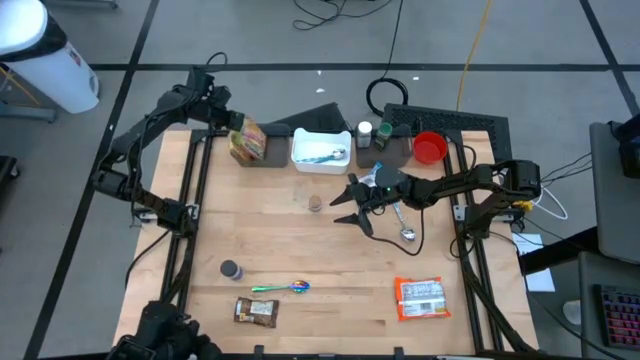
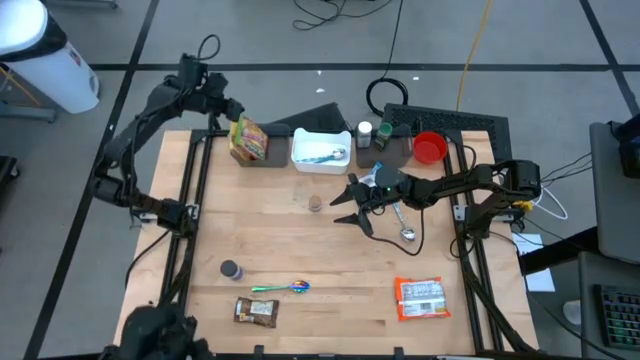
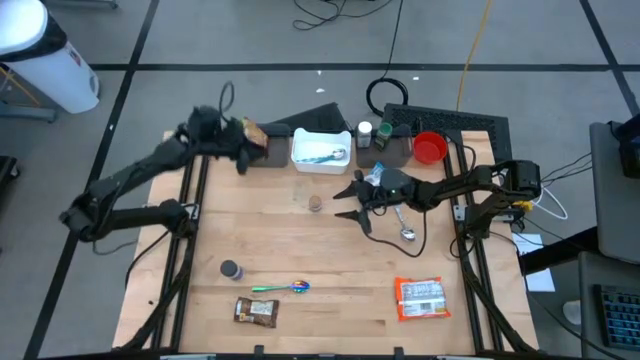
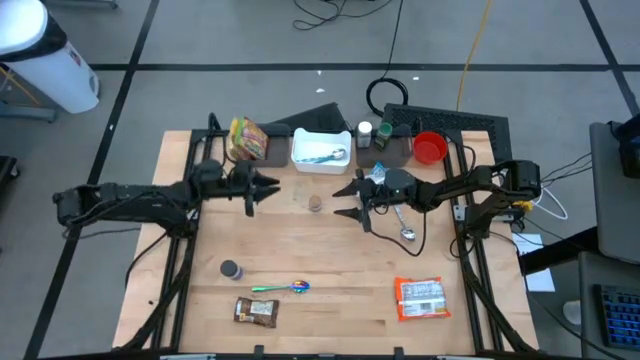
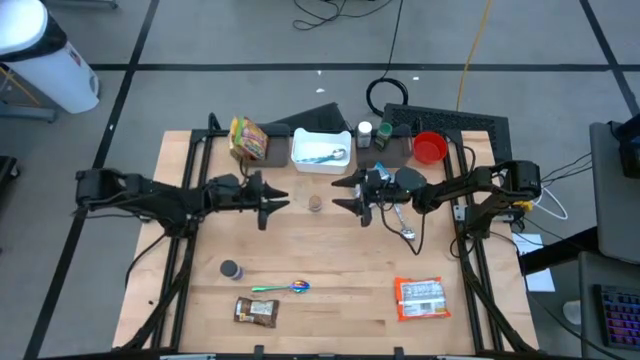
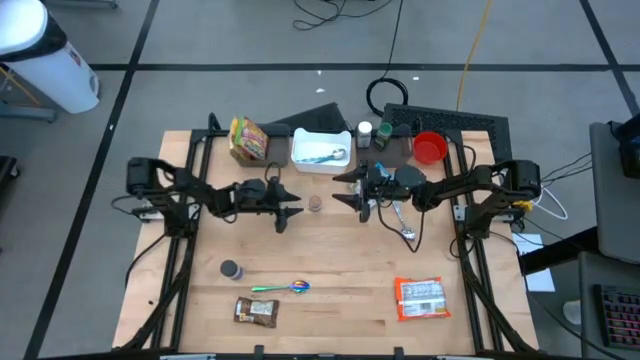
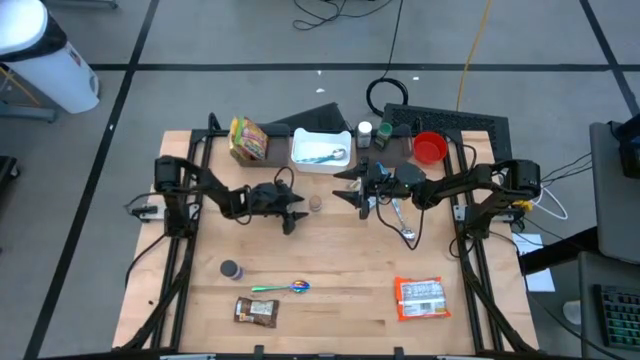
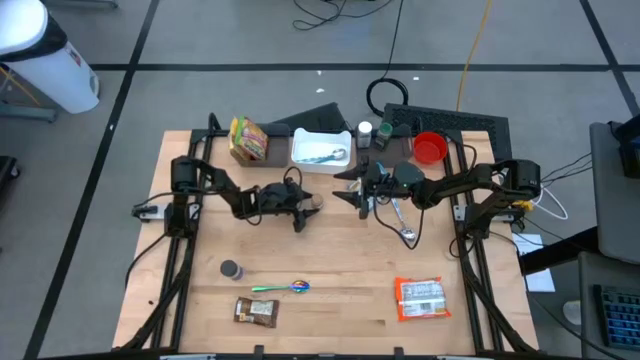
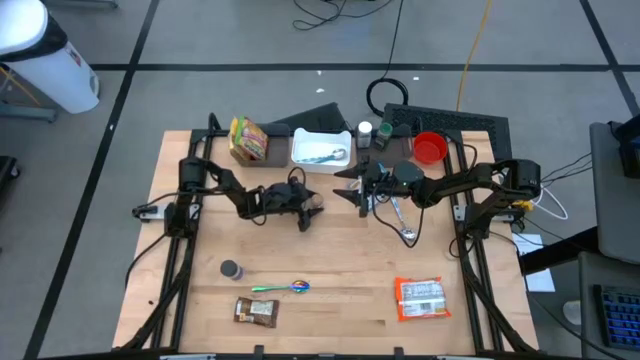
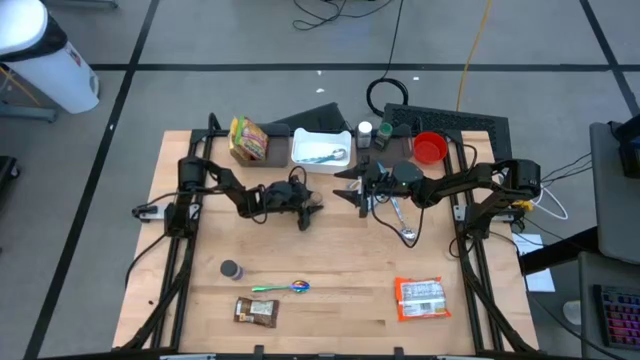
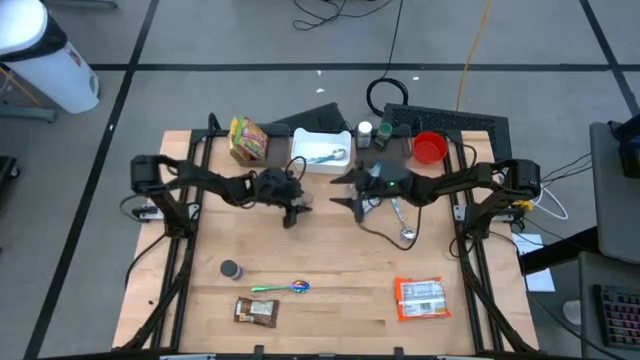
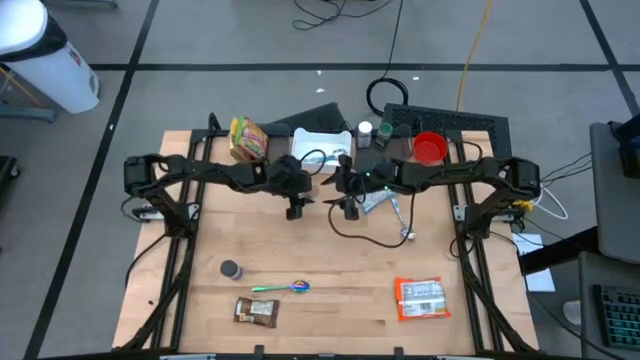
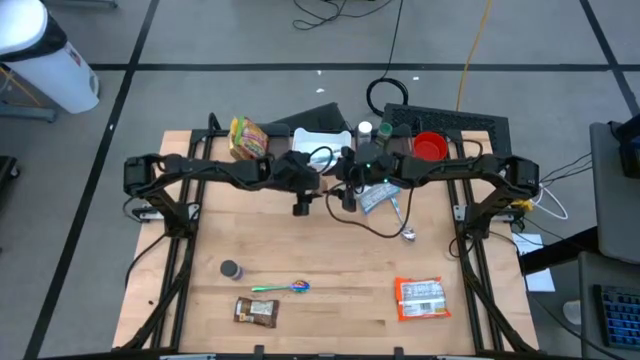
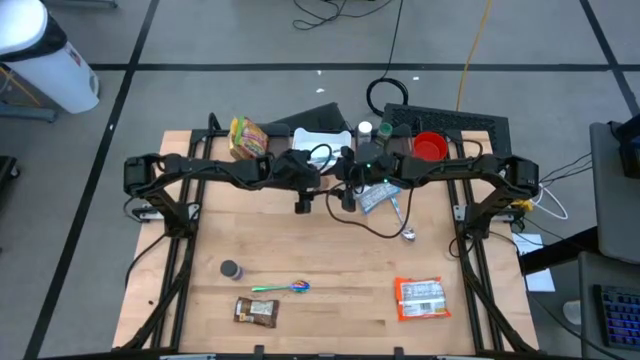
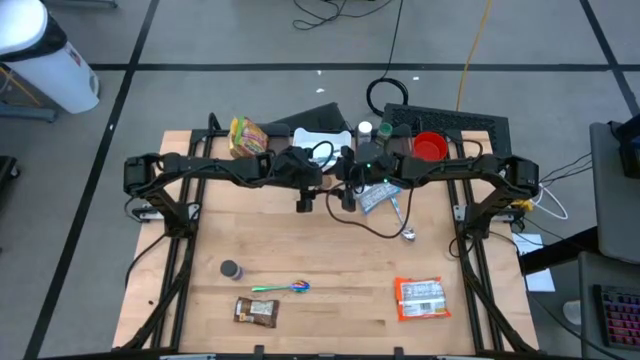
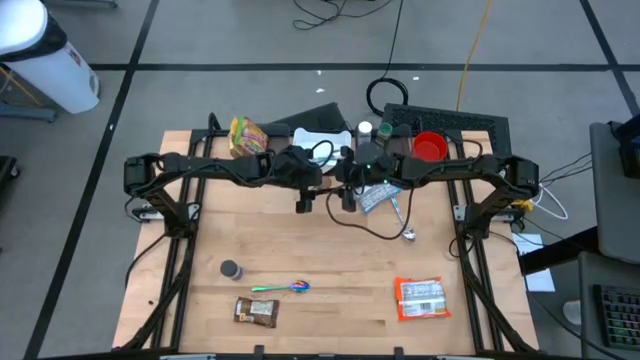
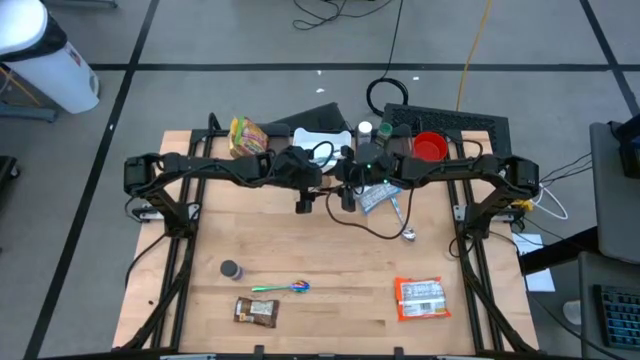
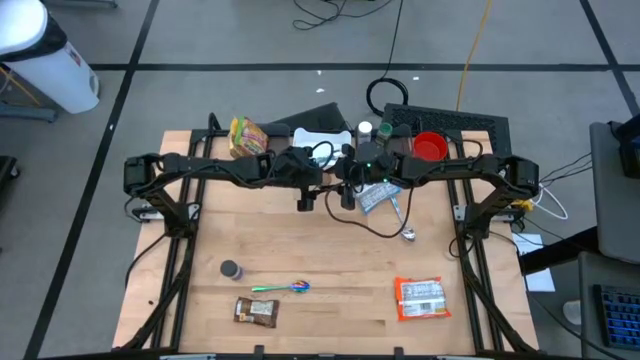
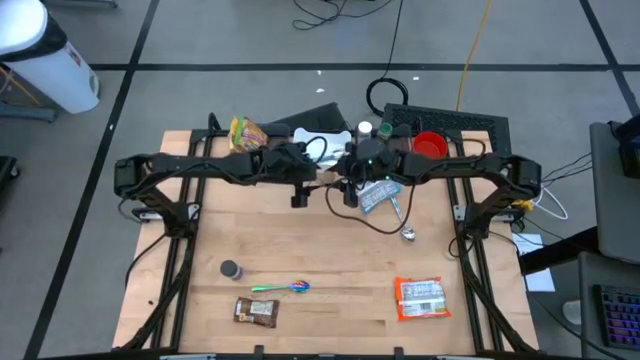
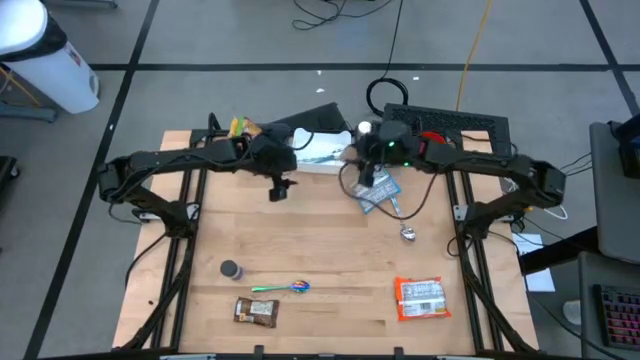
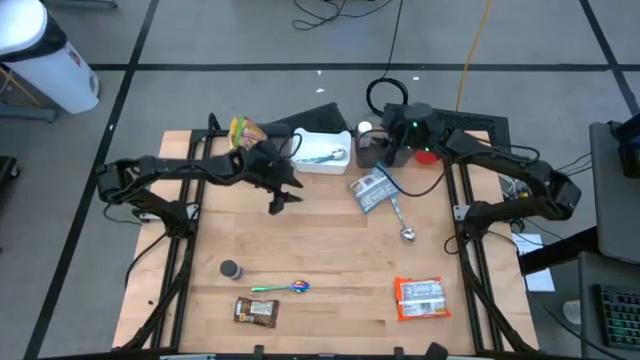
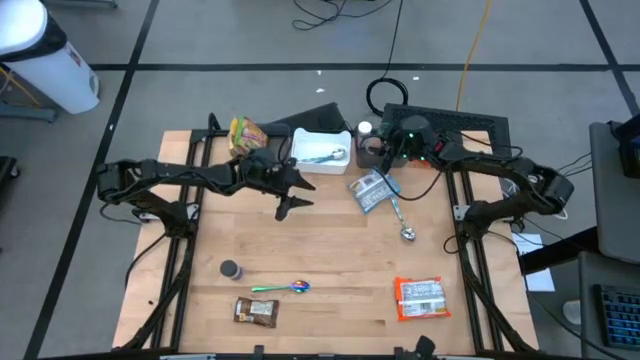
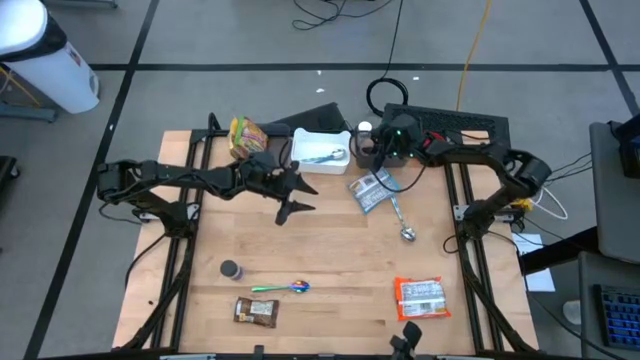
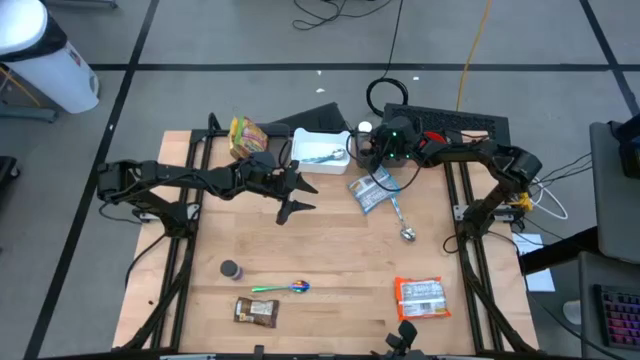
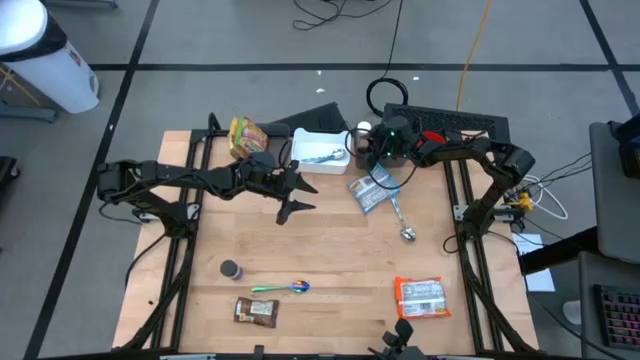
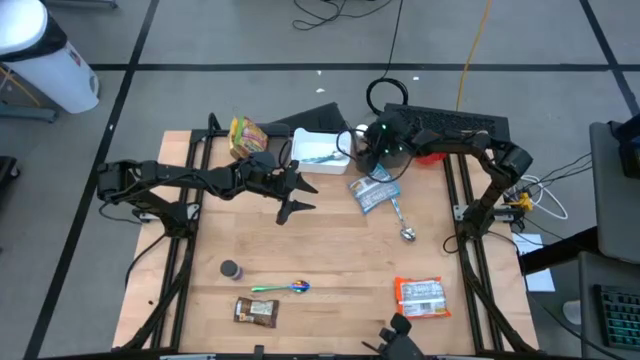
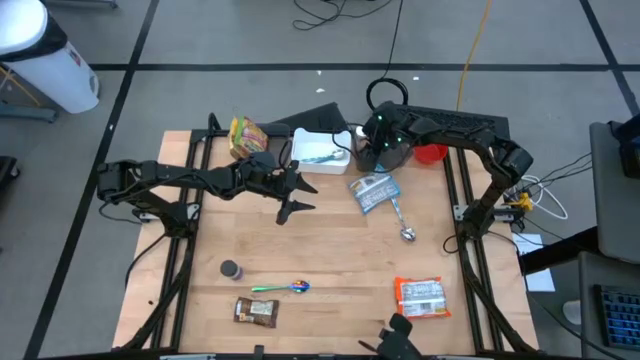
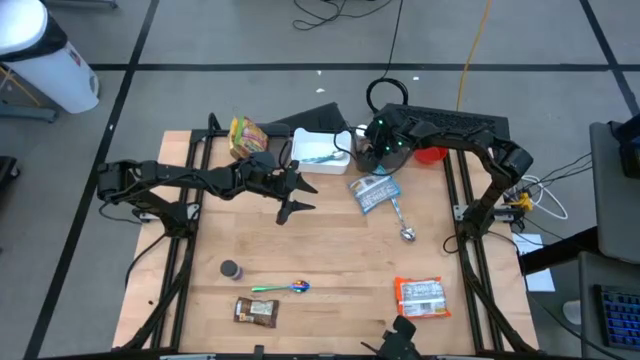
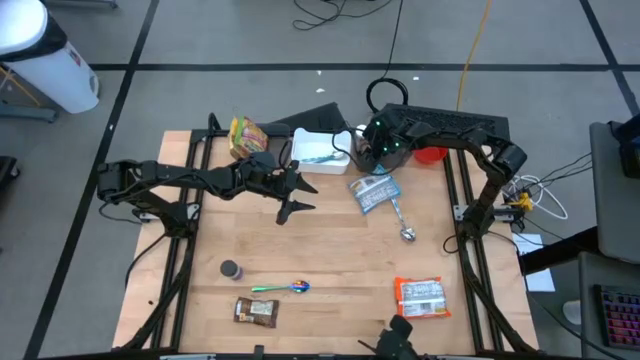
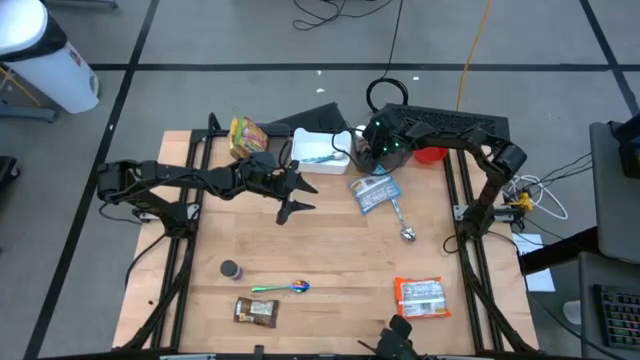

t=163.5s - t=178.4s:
Task: Pick & Place Food Item
Put the brown seasoning bottle into the right black bin

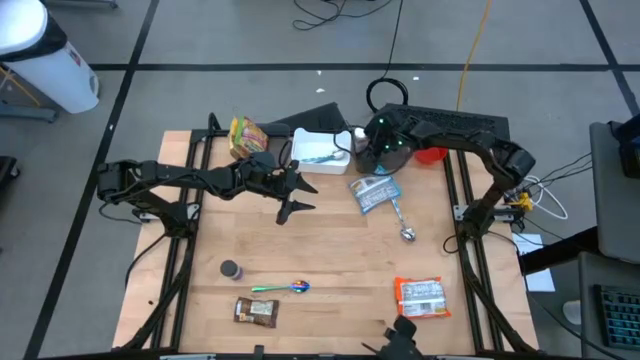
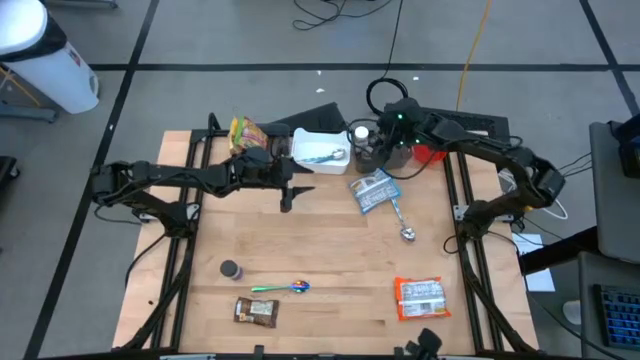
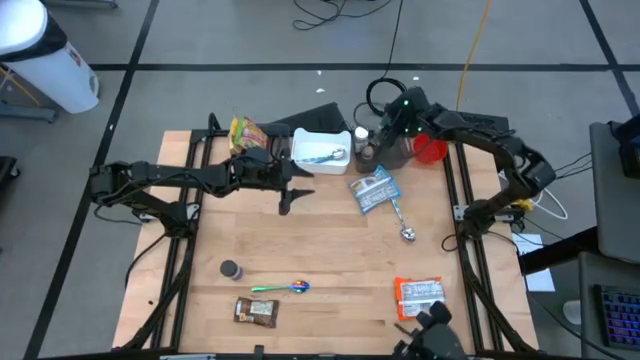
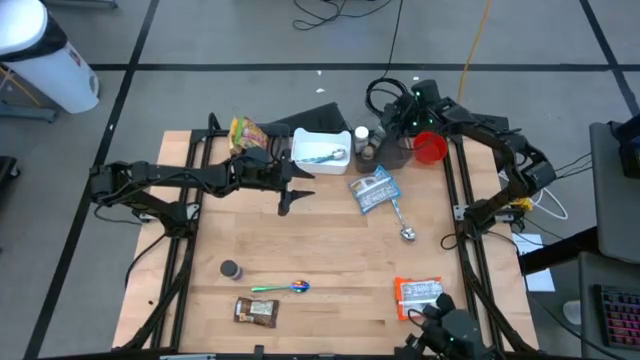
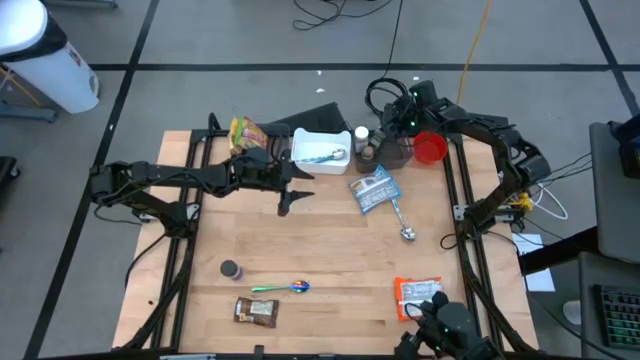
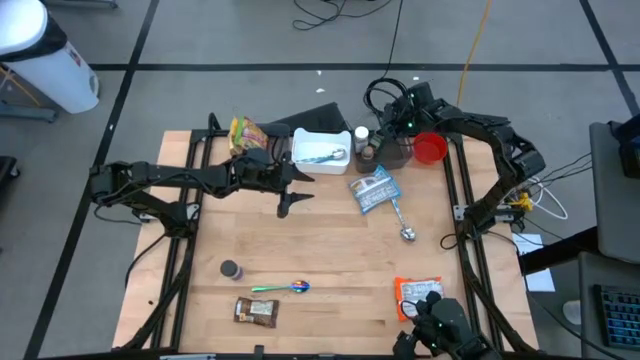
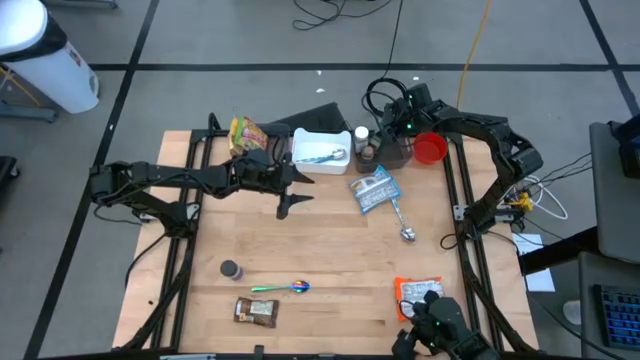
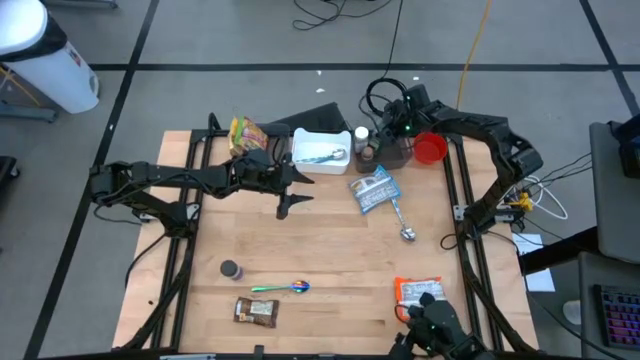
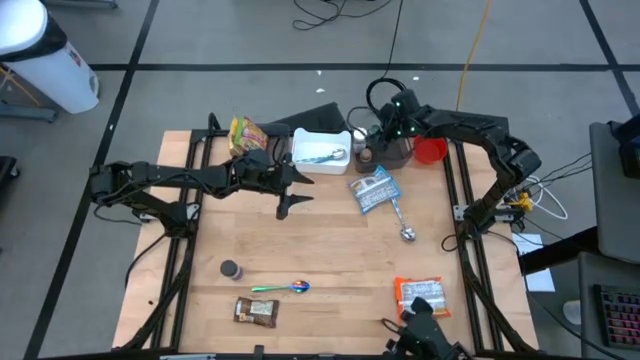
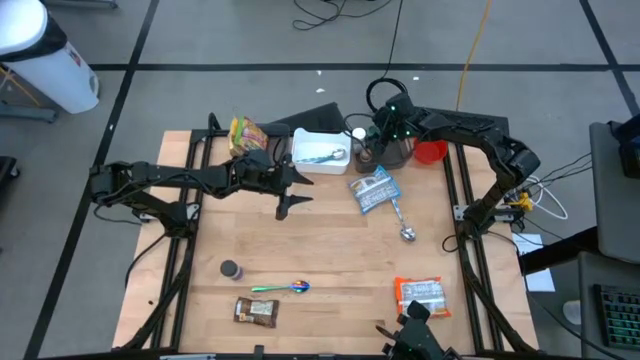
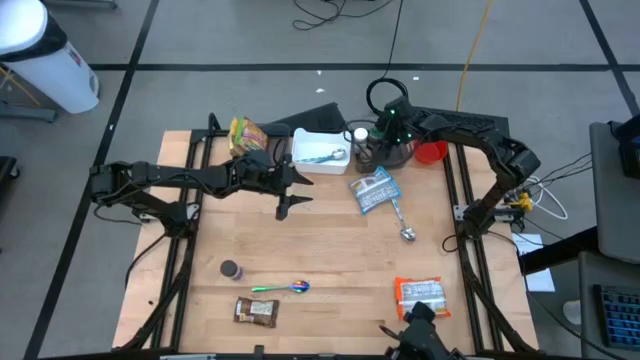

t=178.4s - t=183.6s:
Adjust the green seasoning bottle in the black bin
